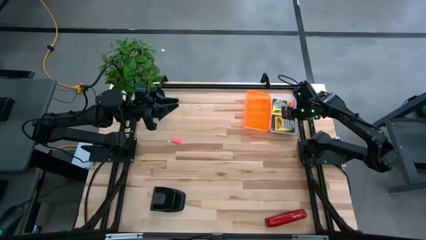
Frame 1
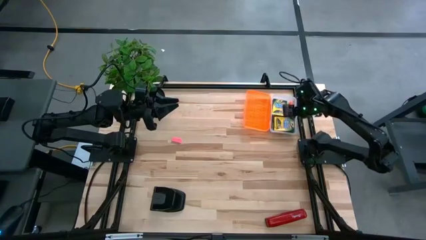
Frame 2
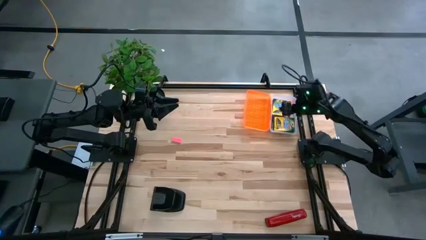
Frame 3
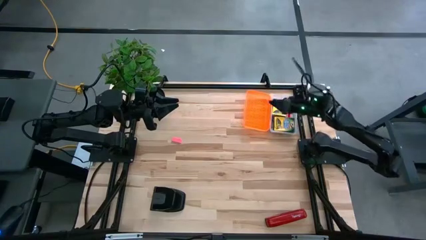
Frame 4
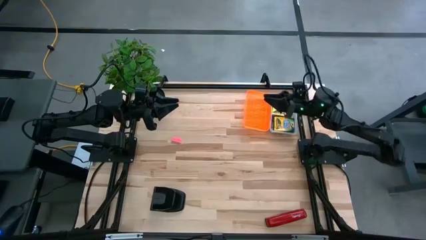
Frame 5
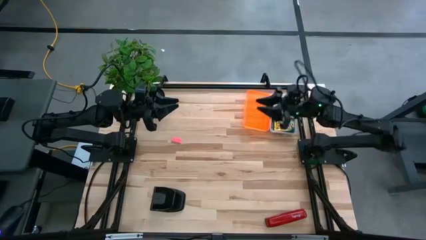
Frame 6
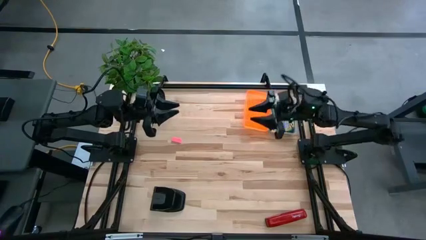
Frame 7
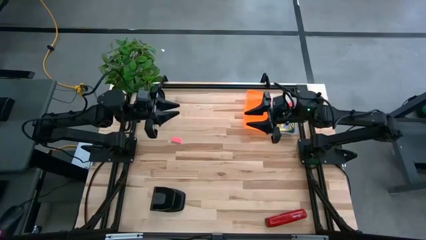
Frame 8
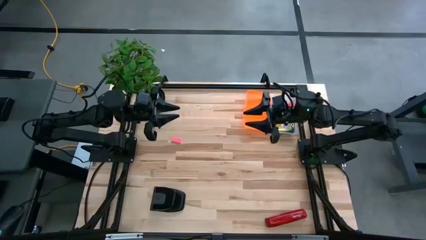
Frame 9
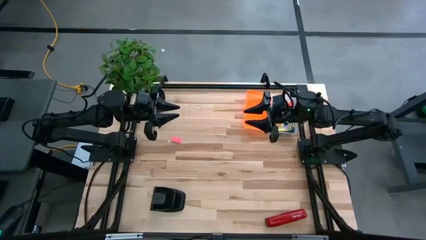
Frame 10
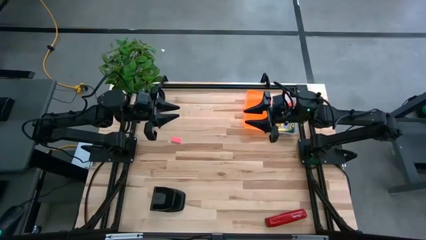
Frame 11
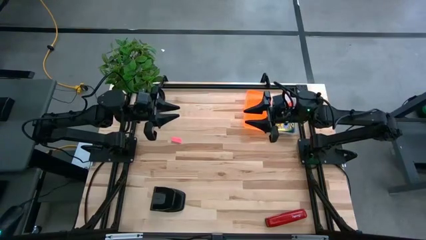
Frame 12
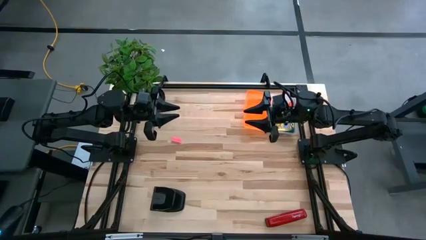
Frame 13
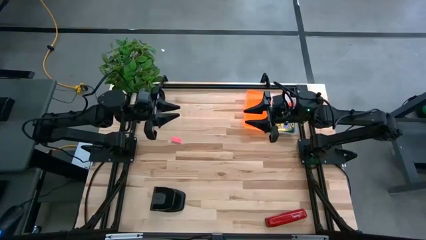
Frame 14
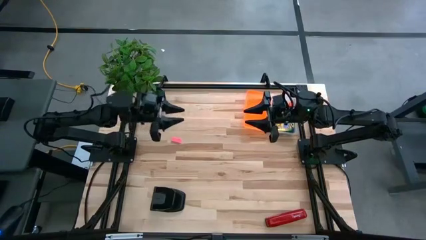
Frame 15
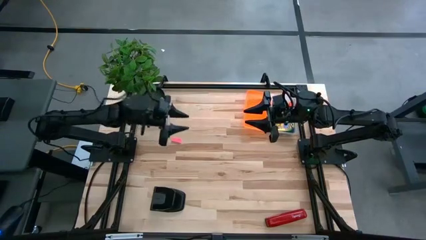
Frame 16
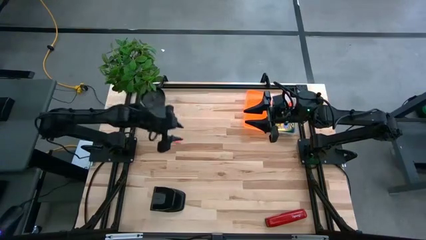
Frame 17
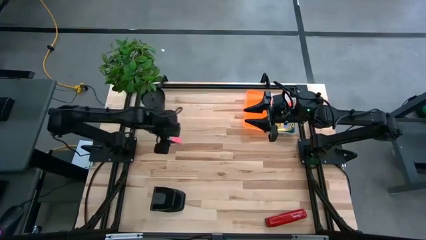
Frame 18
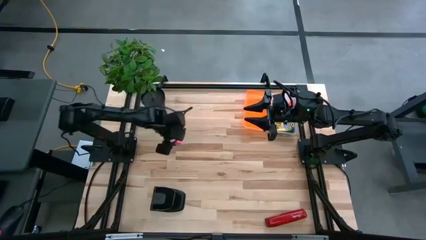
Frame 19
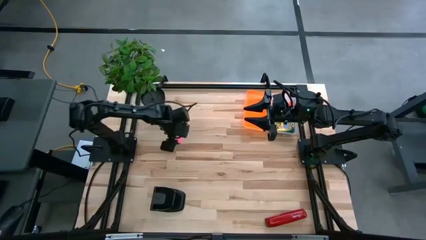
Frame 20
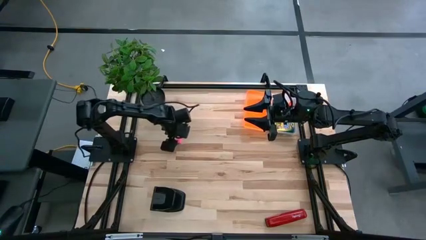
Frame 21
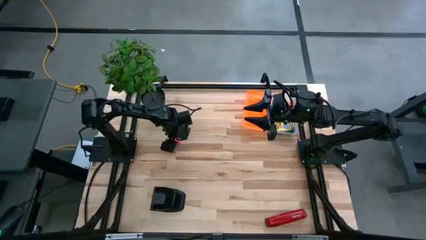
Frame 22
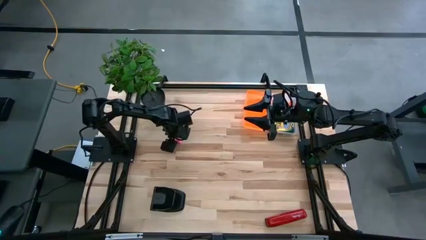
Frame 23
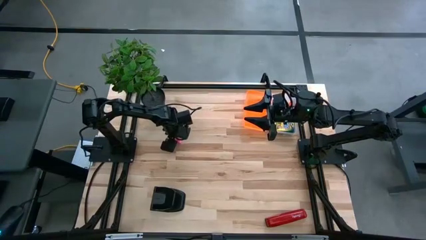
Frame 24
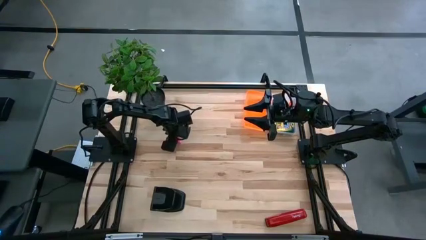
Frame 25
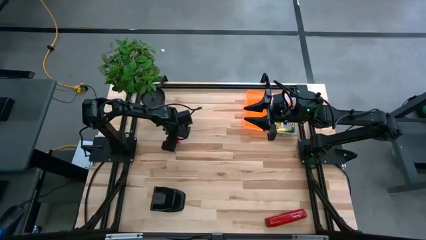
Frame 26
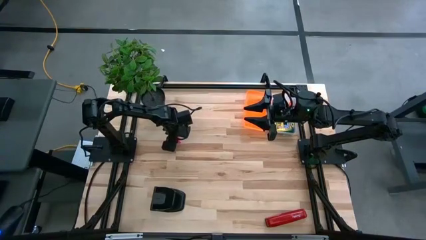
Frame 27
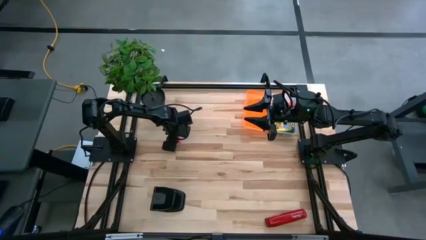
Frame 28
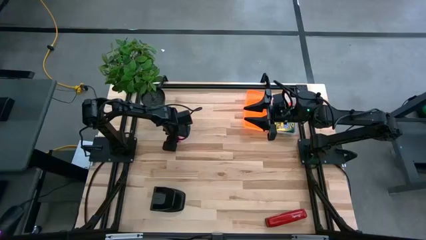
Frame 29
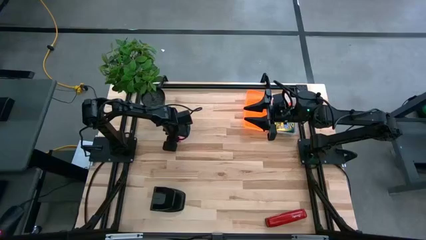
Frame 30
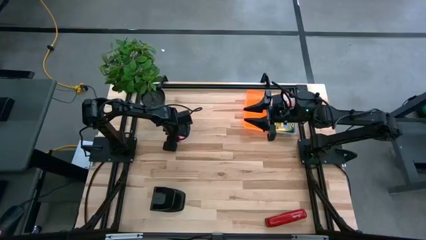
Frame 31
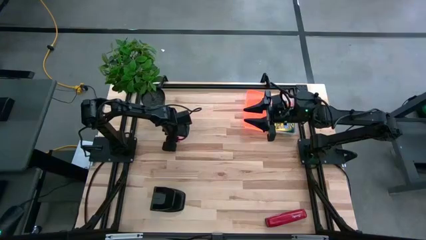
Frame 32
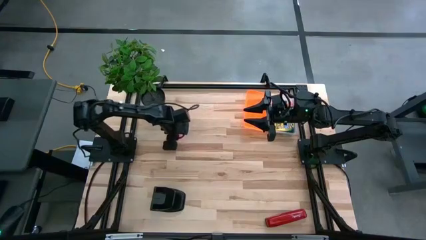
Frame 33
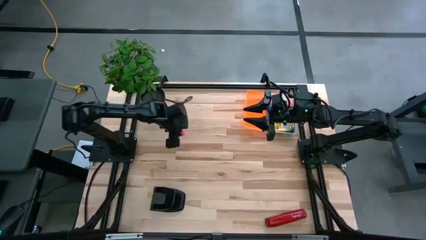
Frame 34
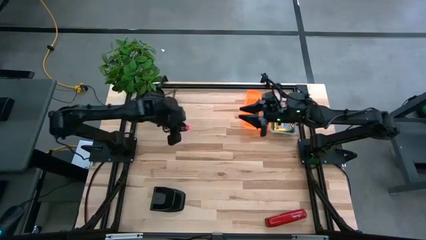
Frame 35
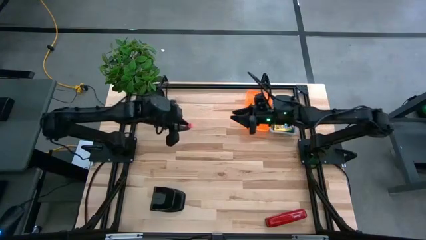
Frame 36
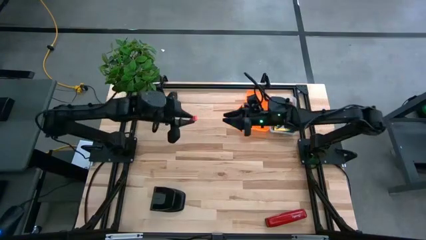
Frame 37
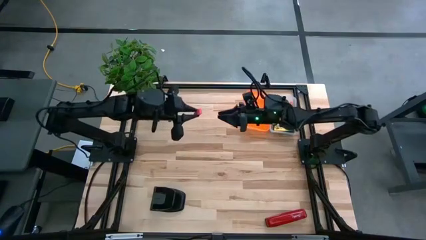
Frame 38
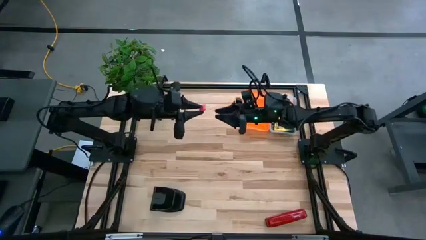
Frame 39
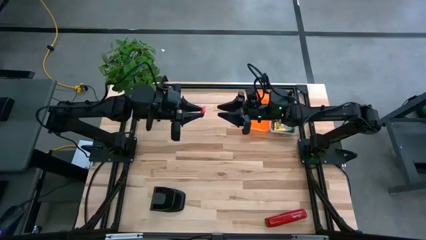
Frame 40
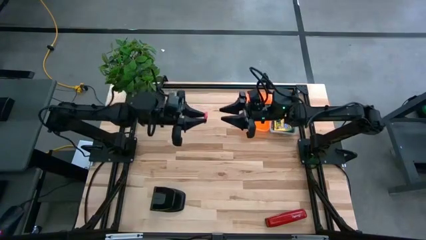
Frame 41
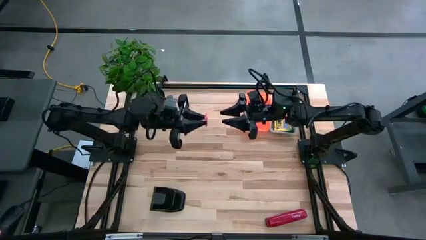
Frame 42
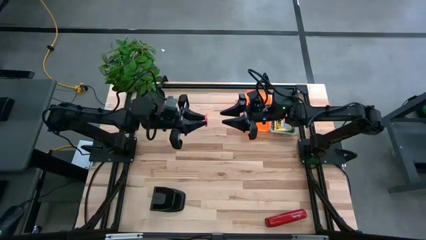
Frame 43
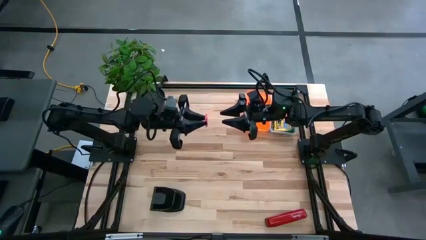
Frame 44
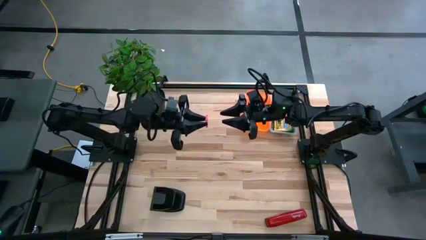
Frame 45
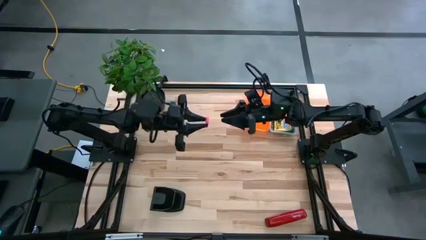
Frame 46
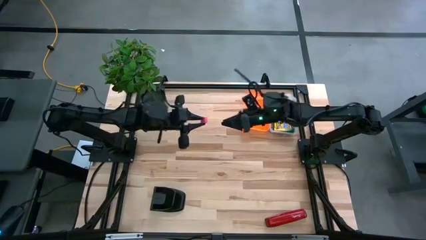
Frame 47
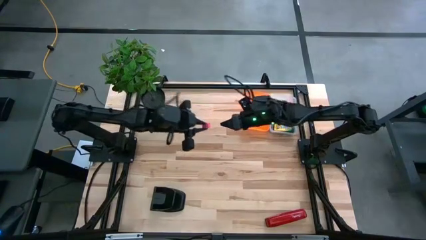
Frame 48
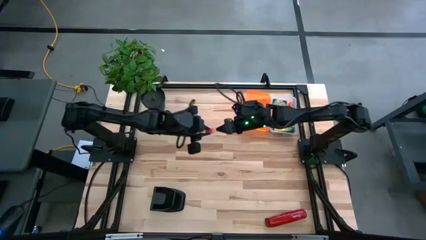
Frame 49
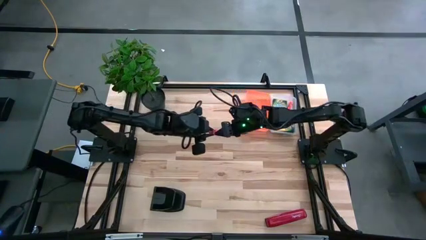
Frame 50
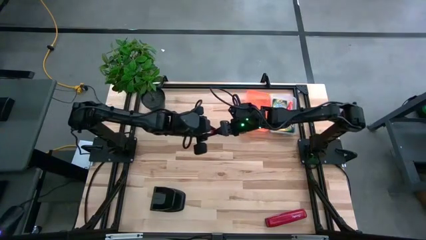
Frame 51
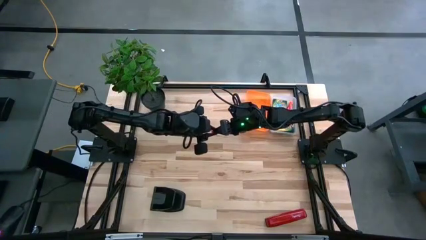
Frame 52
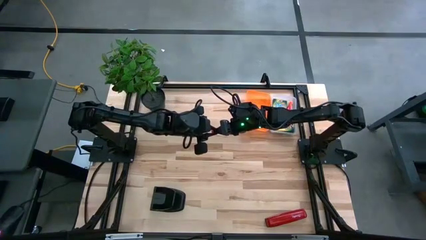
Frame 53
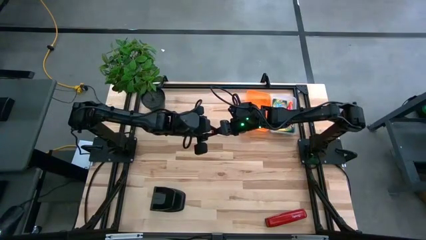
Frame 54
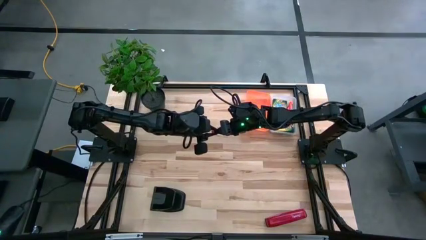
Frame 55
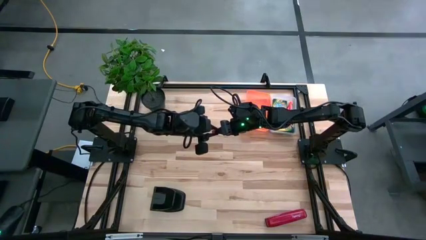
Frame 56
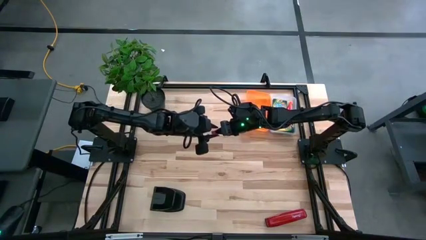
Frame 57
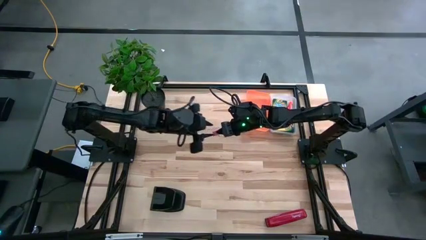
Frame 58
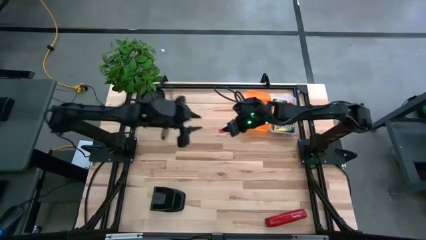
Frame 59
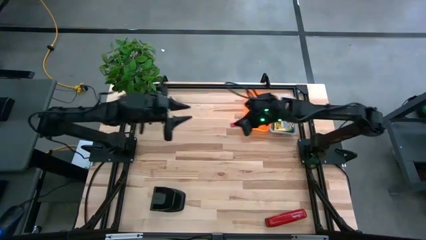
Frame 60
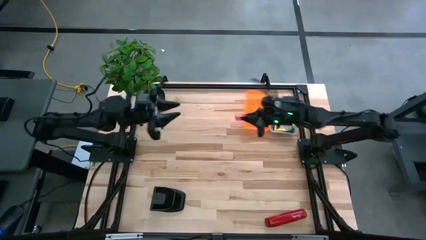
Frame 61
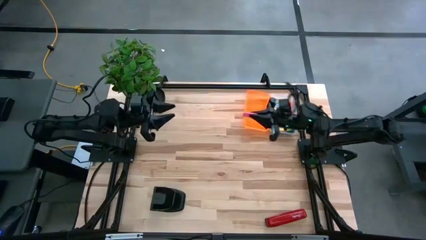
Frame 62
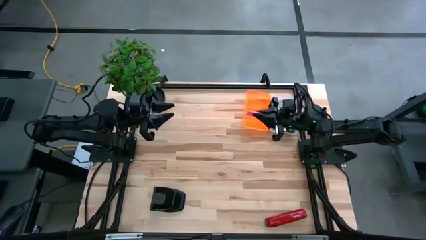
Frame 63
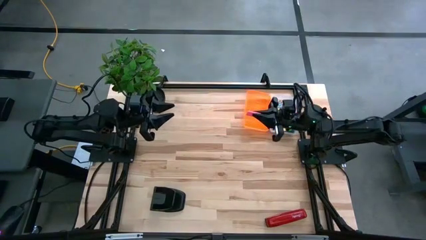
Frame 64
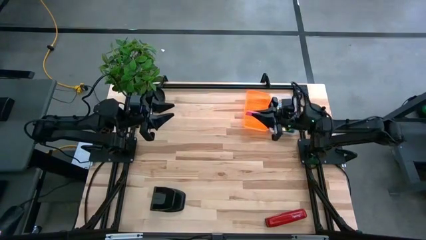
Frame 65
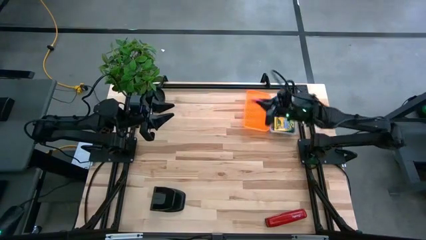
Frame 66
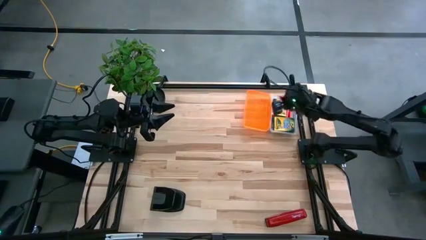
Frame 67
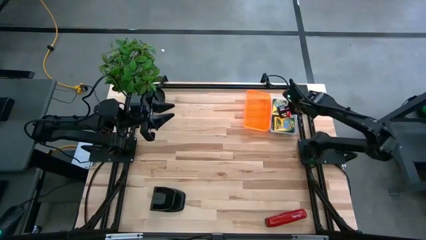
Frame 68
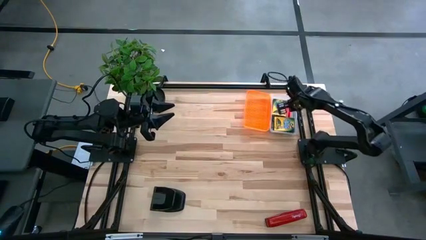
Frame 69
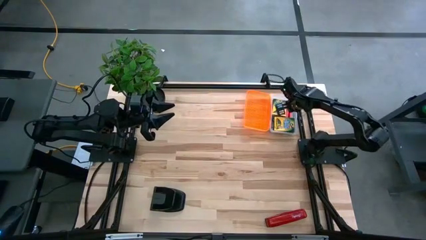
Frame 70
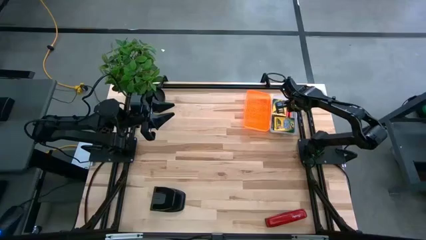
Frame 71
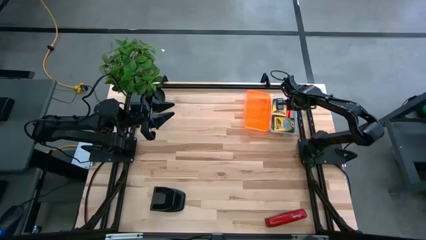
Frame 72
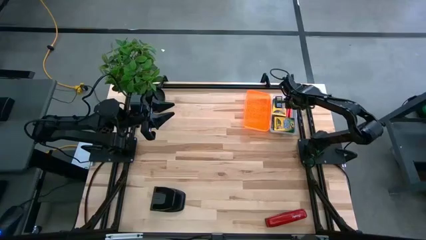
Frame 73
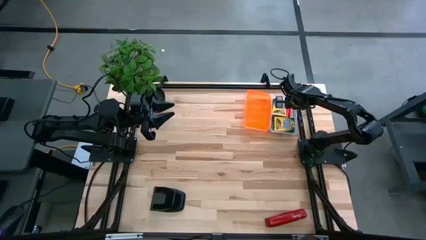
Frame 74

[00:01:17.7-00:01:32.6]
Task: Pack school essentials
Put the pink eraser into the orange supply box
